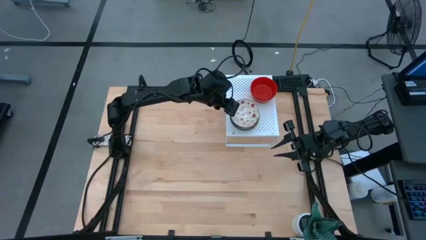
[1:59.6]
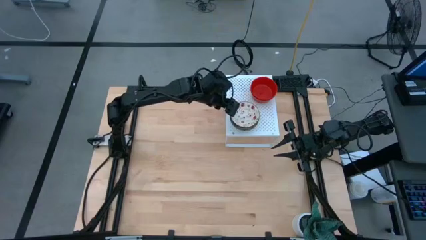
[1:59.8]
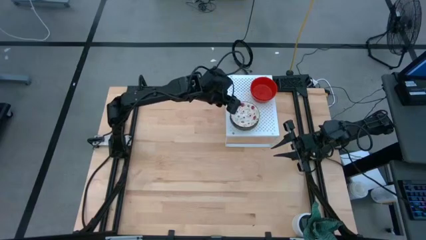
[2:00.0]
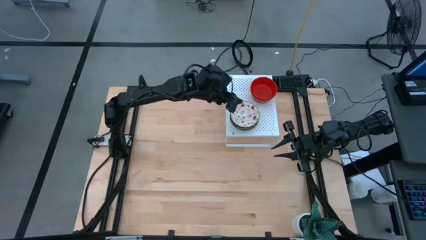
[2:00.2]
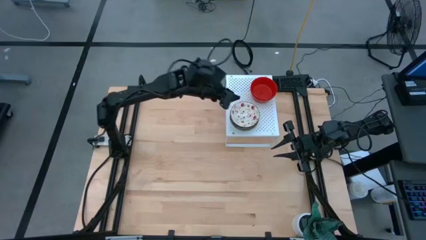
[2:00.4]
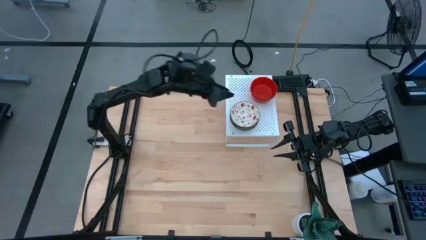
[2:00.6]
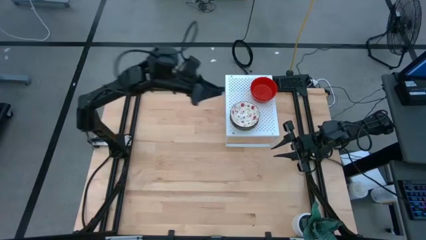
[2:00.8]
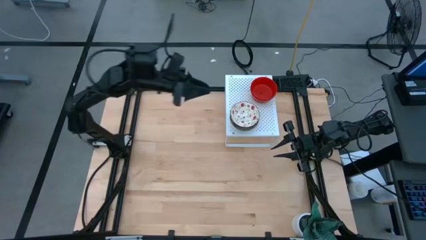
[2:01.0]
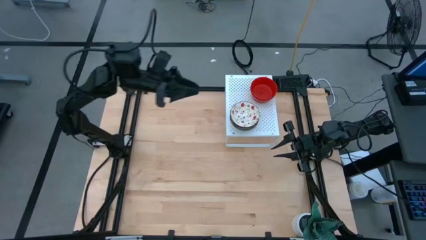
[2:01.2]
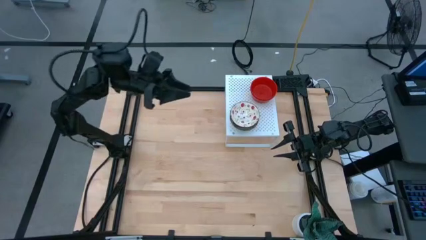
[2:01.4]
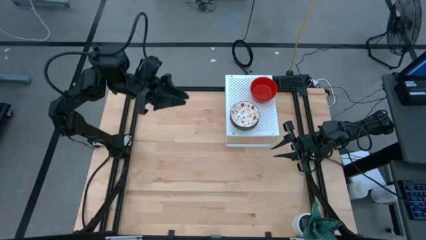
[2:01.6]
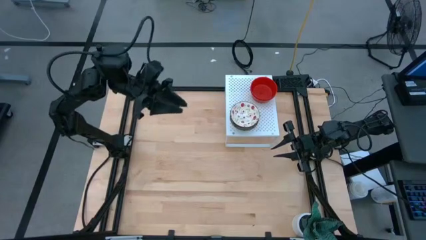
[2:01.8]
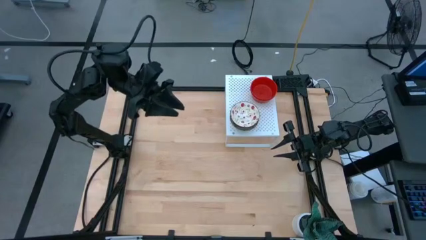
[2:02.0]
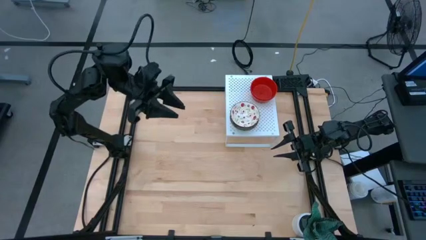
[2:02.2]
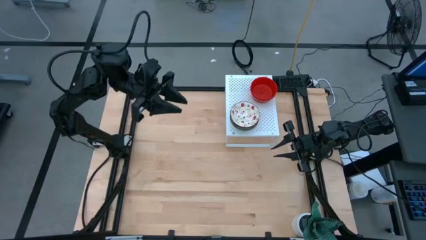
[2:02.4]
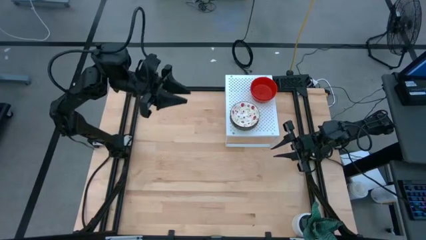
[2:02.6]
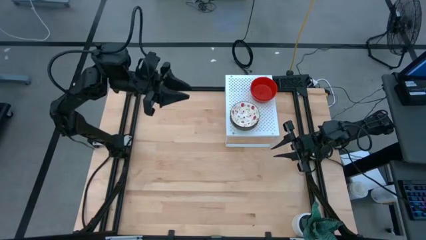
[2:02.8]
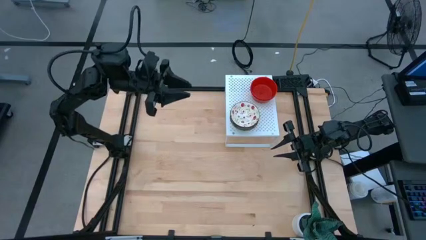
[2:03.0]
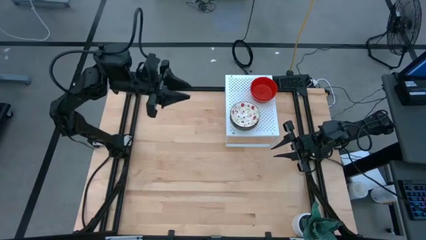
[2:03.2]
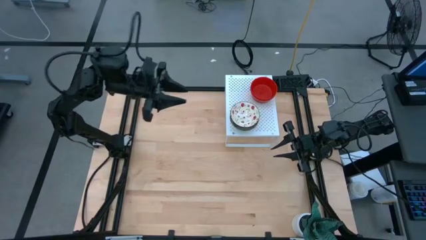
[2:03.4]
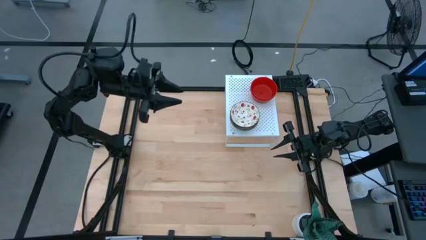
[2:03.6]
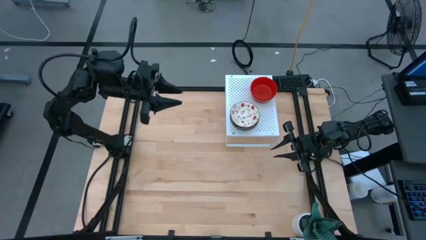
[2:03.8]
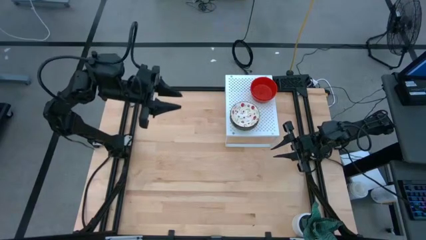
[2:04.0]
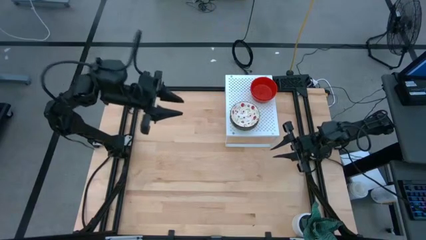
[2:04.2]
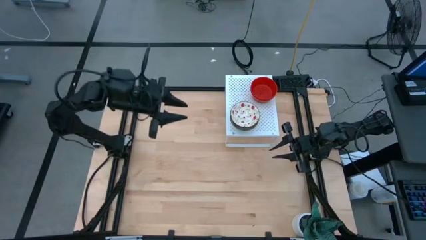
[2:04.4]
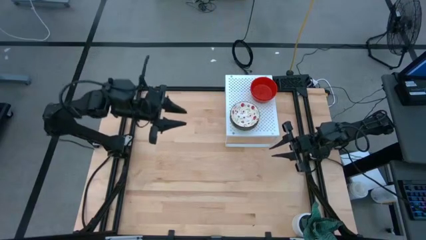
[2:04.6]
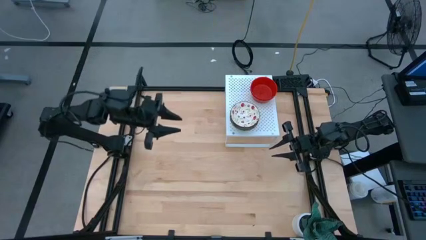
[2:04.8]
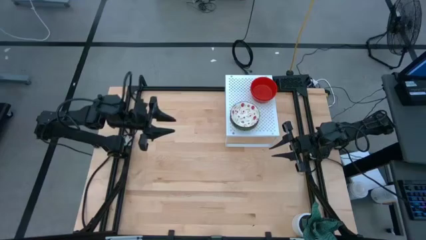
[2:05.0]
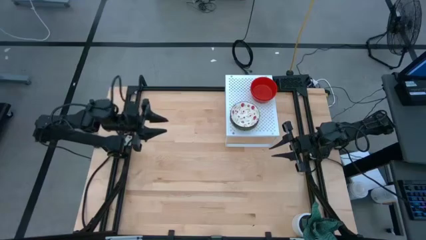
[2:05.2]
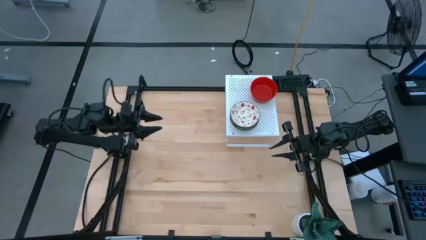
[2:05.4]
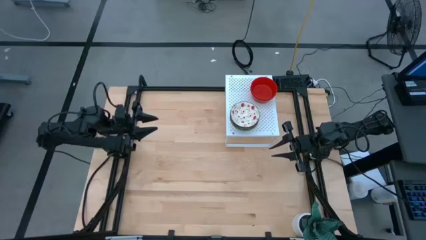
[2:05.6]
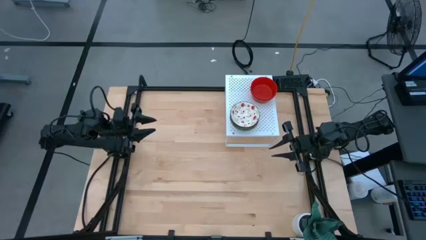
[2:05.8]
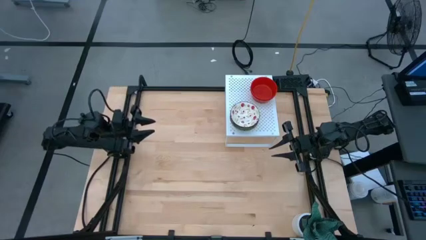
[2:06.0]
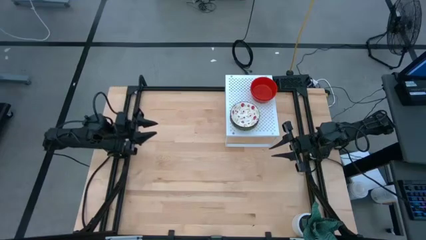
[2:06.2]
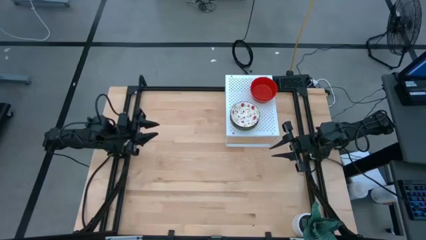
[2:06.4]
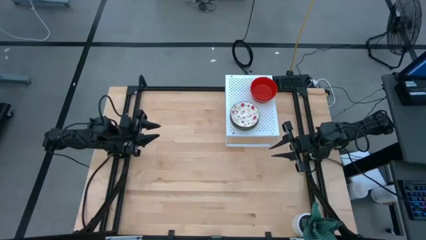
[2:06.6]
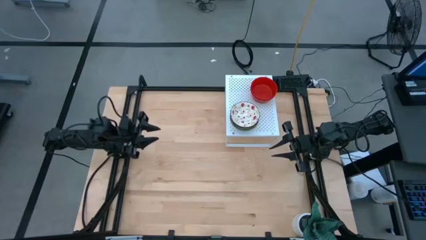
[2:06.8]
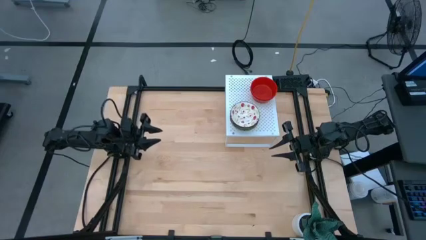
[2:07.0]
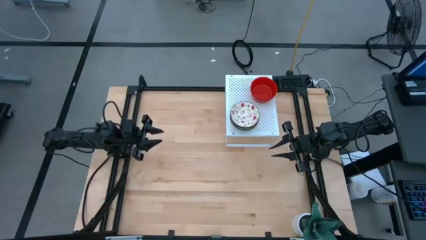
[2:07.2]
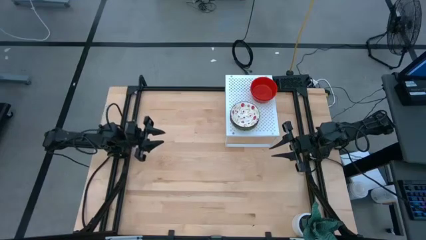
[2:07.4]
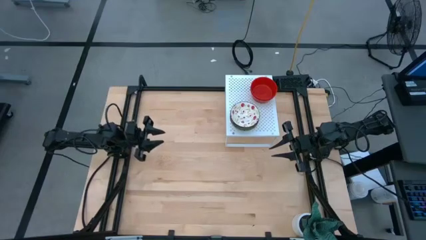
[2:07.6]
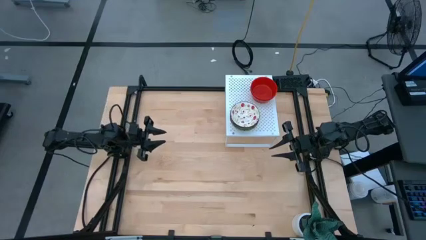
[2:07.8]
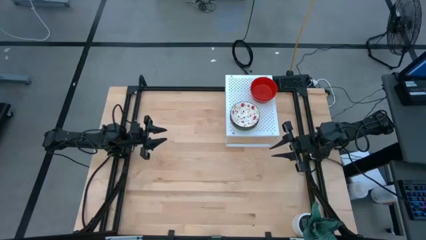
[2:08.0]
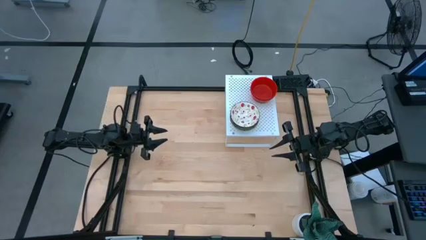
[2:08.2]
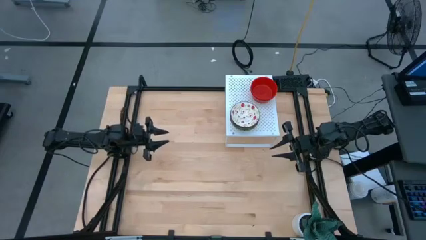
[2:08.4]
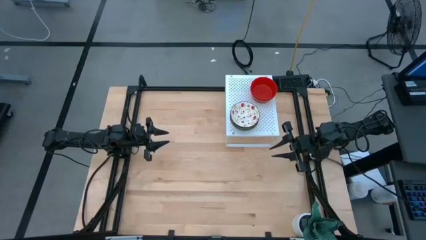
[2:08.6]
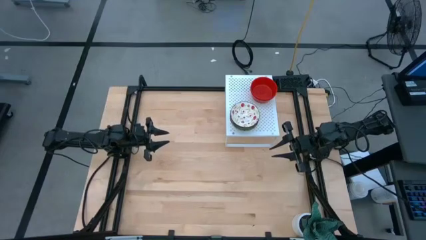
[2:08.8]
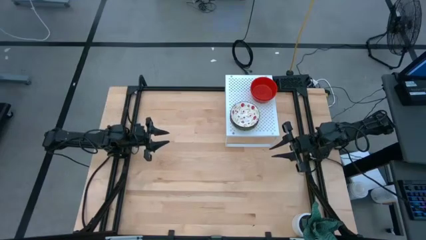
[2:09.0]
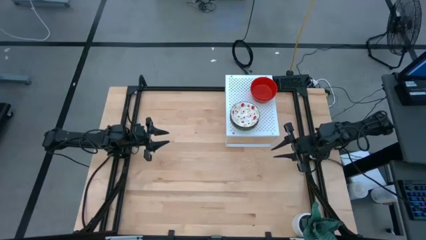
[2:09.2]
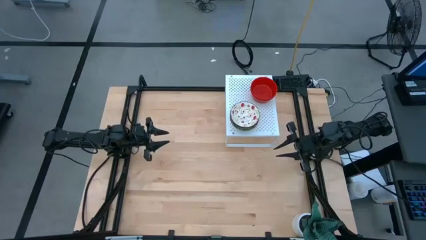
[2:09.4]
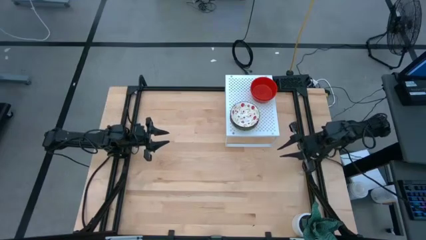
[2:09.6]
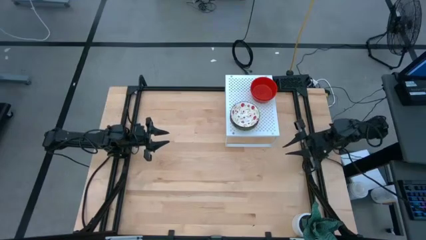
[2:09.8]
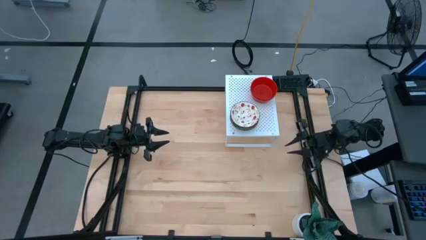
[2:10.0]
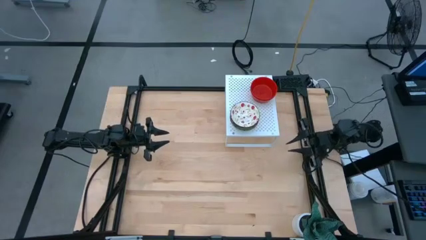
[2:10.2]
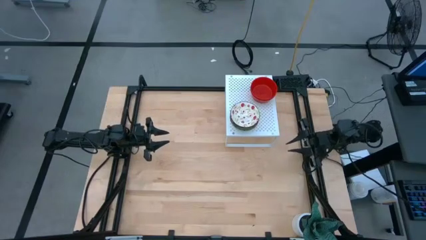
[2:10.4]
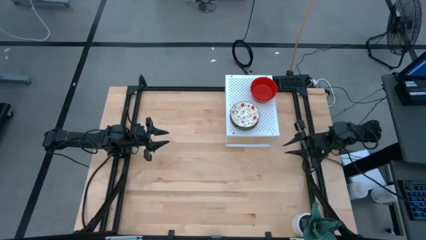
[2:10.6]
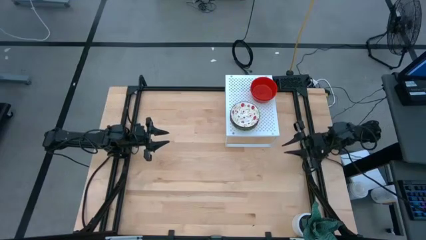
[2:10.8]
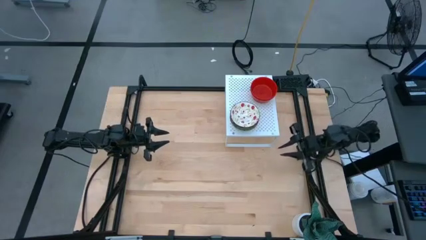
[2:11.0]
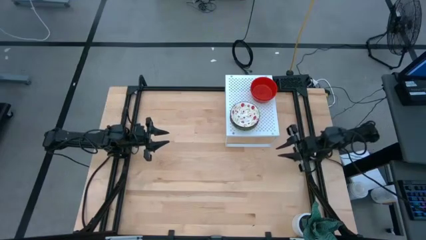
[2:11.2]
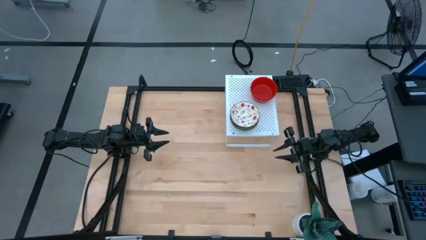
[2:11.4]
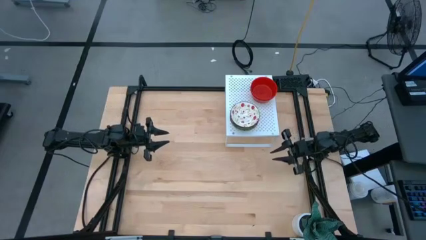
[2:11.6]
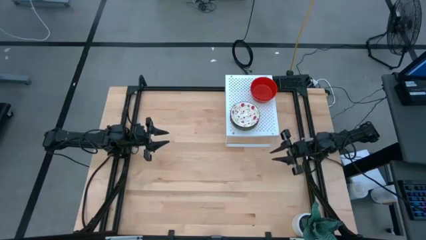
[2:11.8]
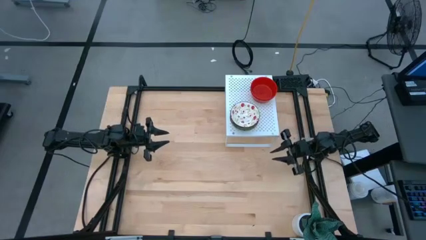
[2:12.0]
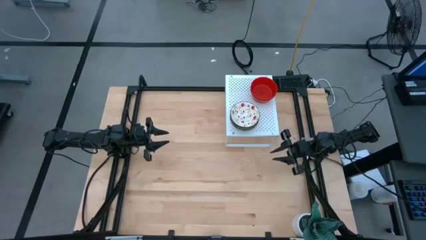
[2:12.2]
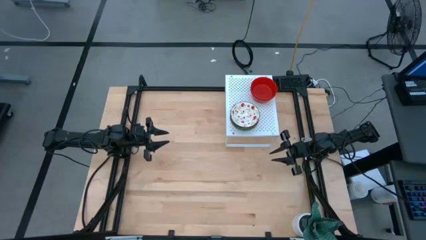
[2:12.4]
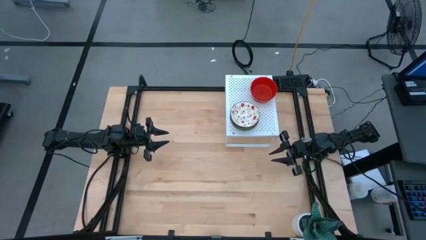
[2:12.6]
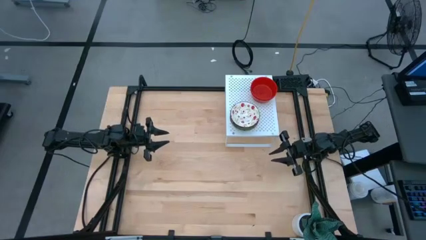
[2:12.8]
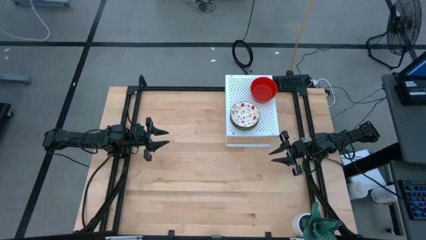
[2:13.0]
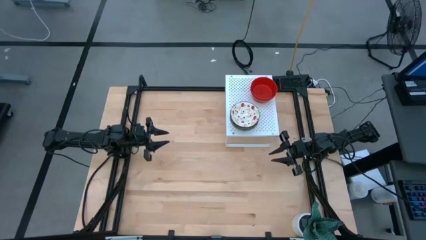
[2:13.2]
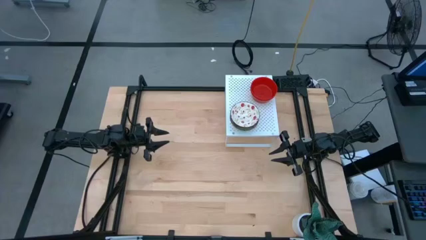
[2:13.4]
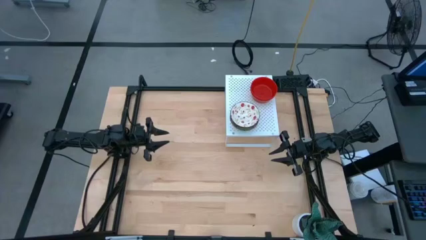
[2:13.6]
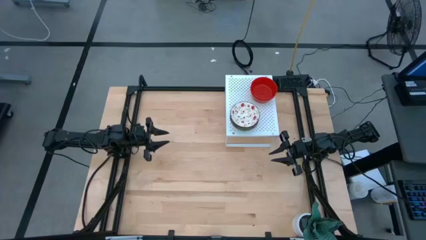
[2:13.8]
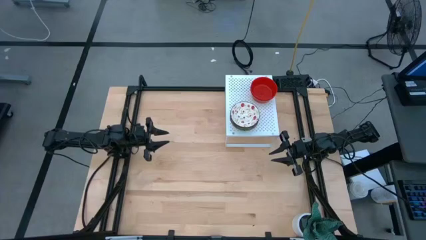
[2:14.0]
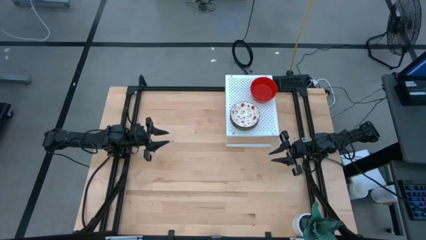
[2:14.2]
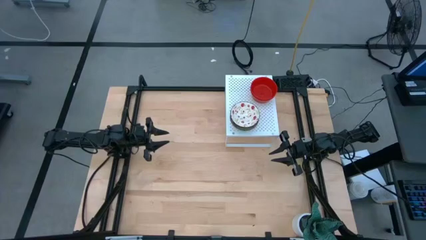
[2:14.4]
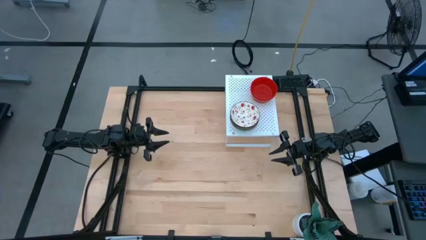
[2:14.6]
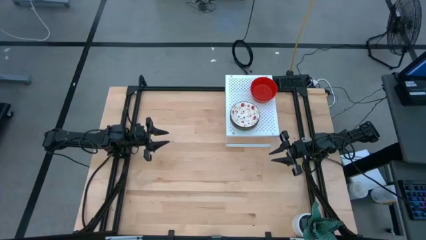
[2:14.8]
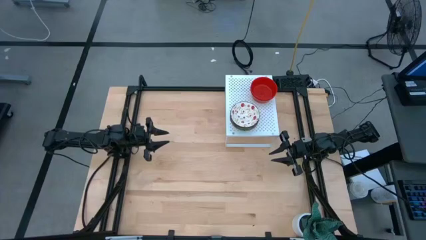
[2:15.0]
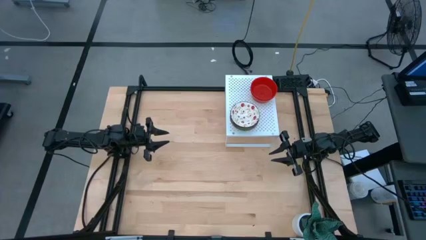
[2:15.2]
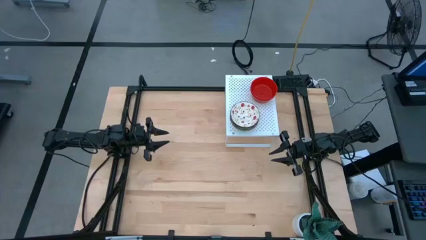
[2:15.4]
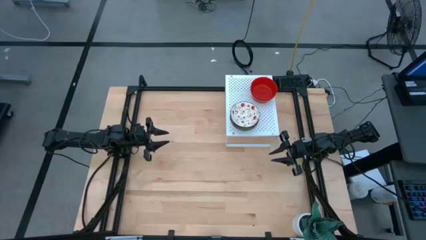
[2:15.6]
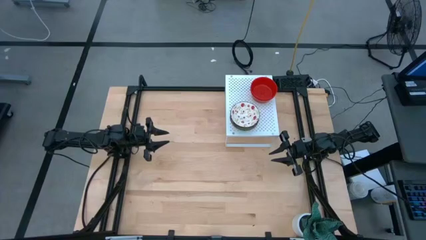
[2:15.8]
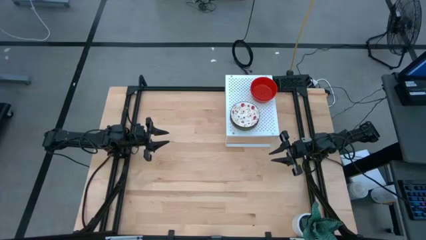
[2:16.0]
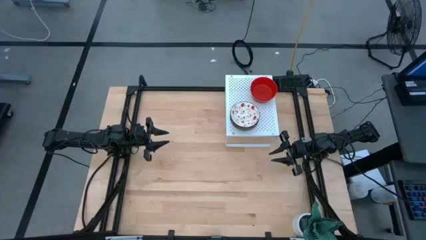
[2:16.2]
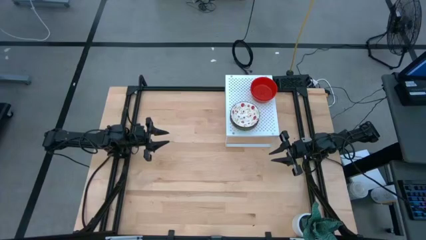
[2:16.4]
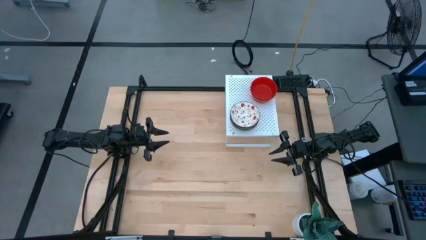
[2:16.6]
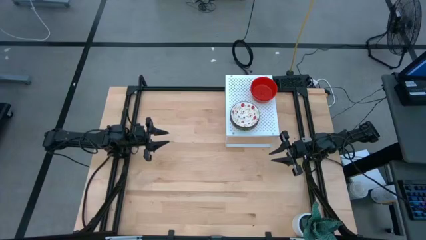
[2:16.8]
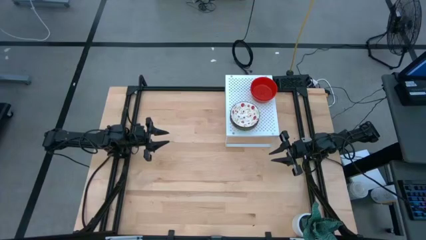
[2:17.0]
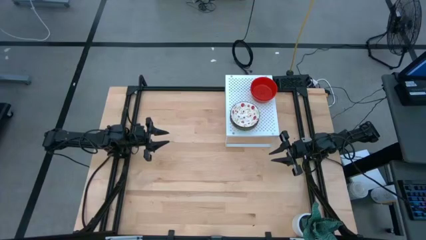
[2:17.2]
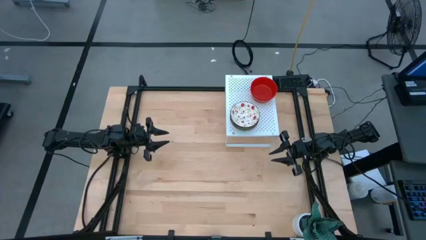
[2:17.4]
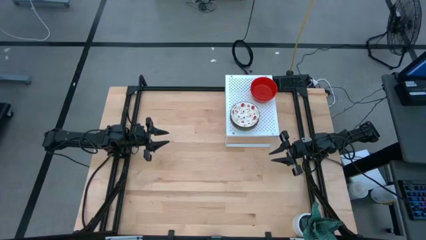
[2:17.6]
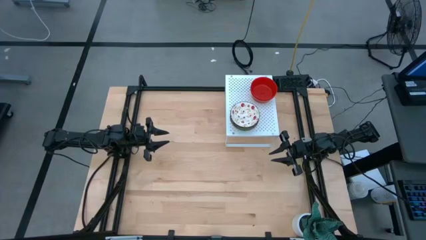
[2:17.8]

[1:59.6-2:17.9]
Task: Pick & Place Mini bowls
Return to Home Position
